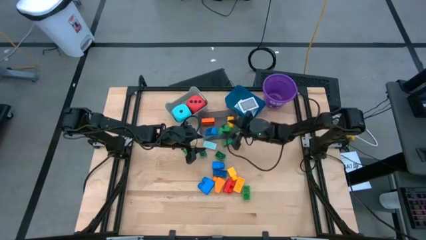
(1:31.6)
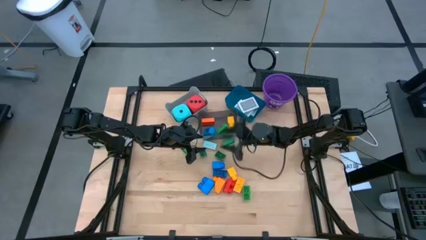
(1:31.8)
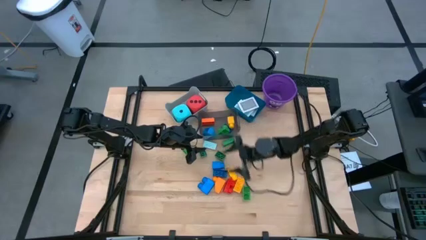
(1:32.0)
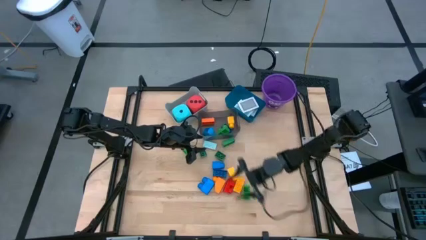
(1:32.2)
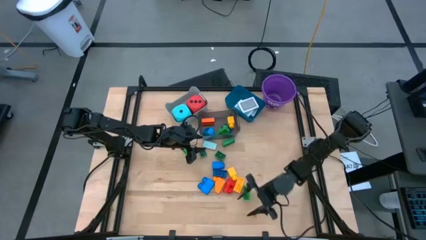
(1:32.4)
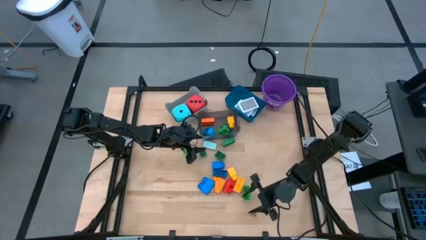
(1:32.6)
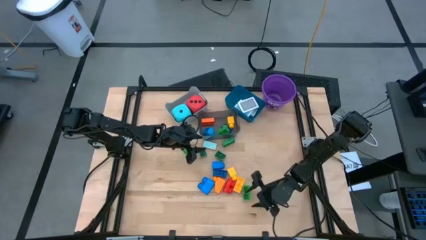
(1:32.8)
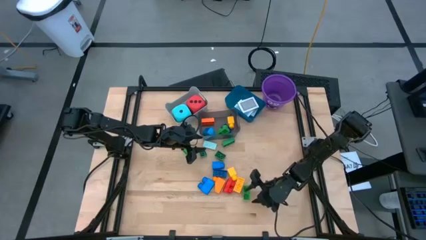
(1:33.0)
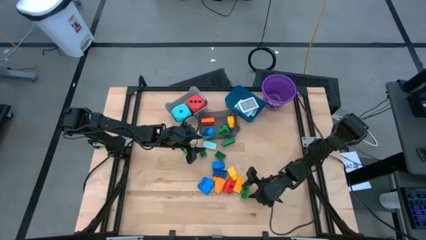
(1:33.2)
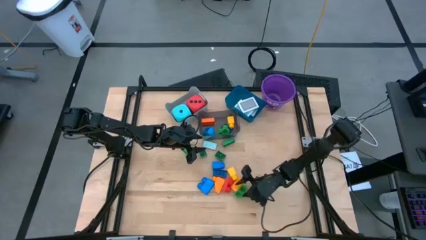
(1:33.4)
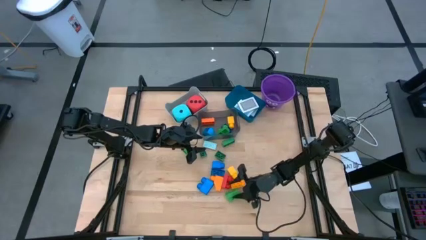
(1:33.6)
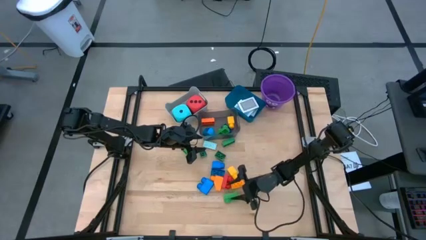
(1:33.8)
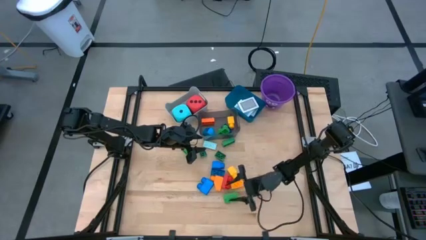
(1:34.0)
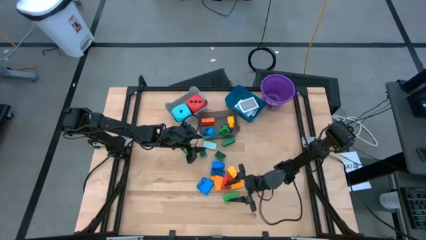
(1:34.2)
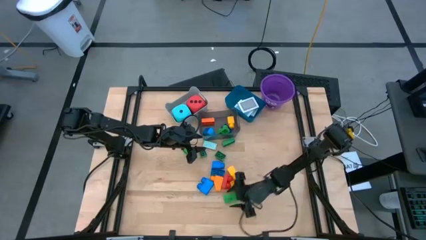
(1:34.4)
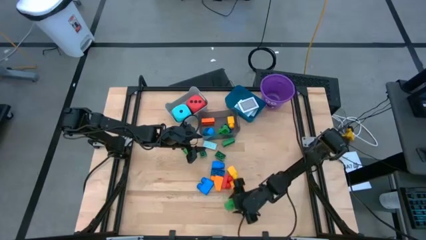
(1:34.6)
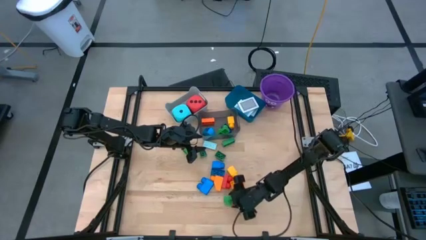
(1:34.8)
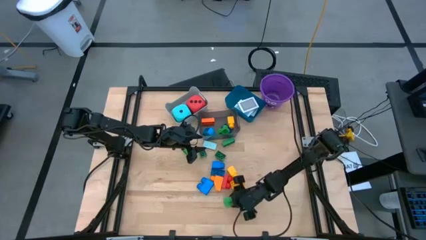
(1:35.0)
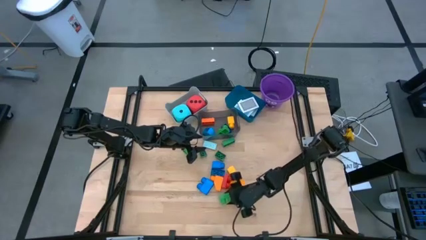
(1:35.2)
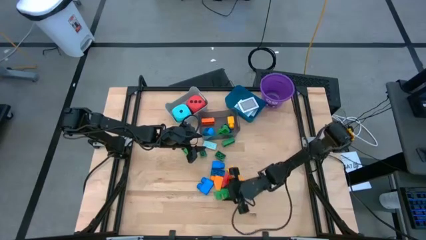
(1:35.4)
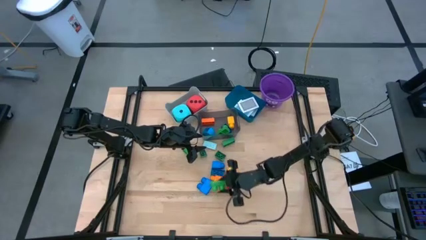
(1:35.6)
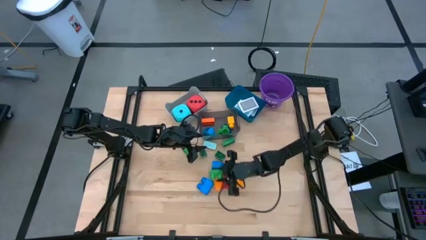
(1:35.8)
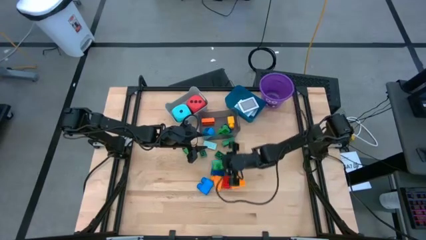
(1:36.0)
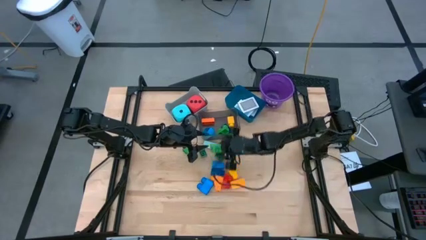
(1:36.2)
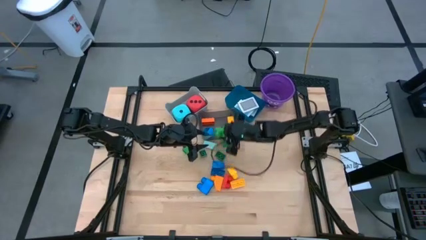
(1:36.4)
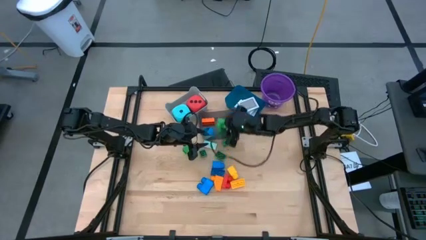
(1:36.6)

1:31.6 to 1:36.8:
Task: Pick & Place Toys
Put the green block into the black bin

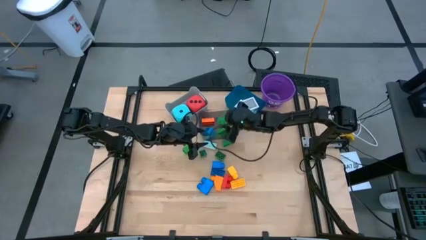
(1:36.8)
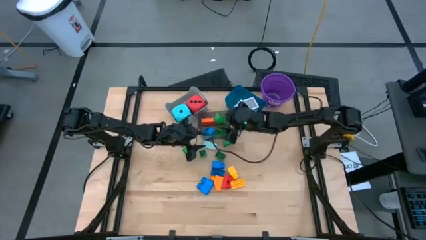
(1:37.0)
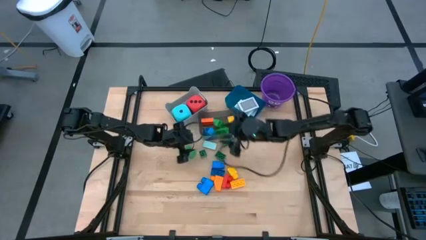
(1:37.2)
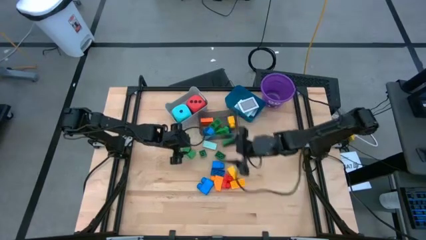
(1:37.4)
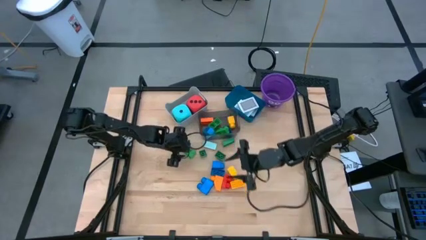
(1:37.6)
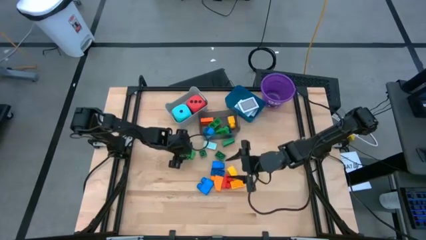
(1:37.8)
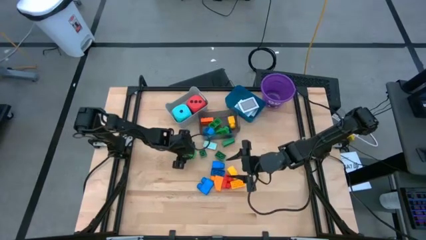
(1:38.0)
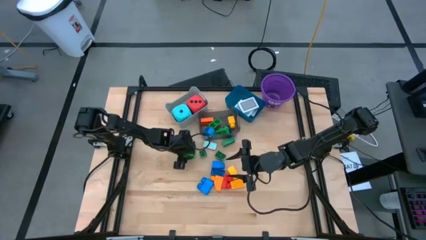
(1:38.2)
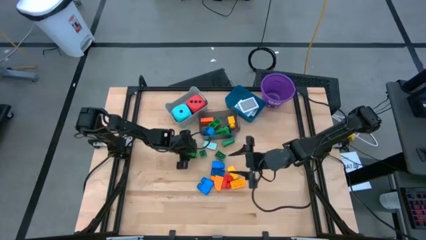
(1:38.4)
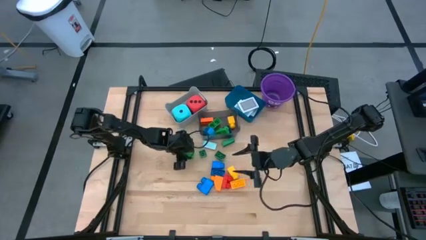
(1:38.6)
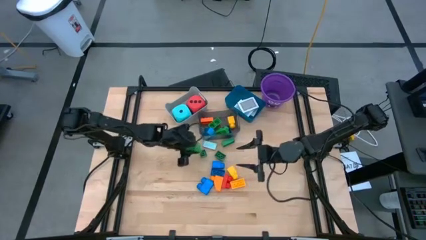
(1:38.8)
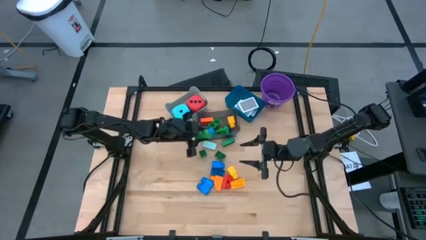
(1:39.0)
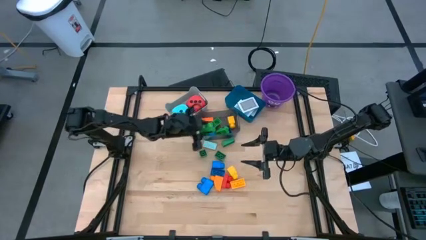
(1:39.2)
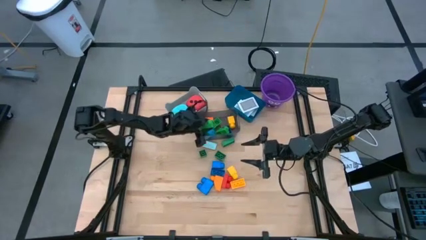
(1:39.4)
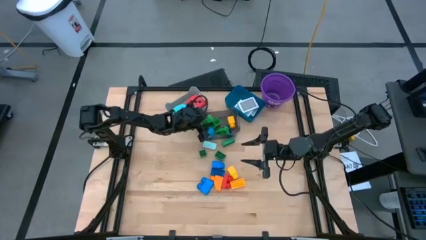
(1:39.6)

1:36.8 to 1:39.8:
Put the green block into the black bin

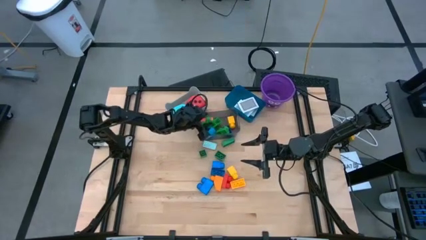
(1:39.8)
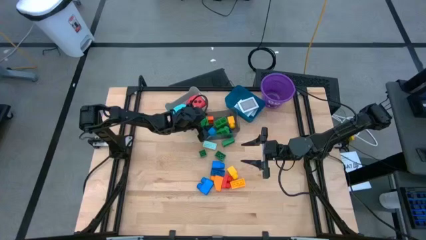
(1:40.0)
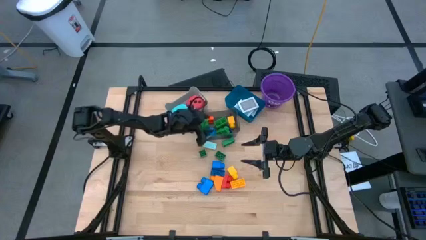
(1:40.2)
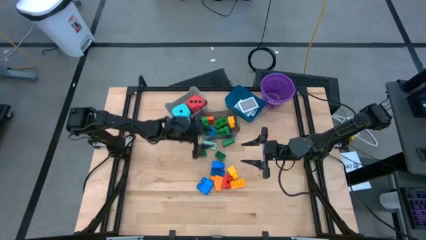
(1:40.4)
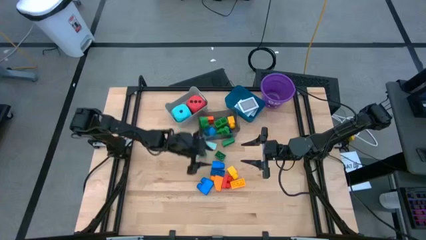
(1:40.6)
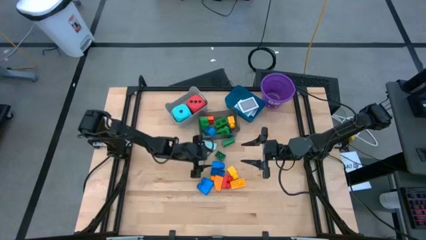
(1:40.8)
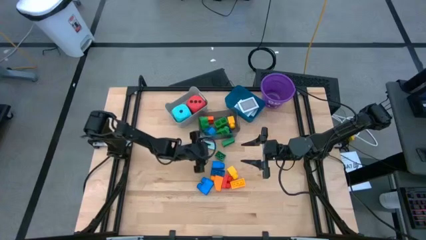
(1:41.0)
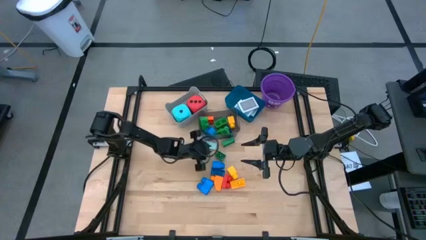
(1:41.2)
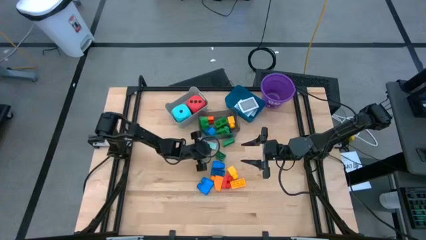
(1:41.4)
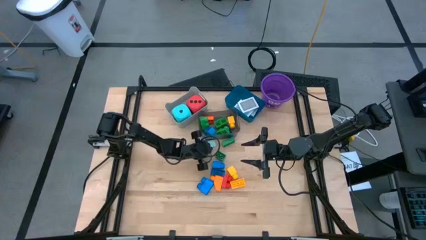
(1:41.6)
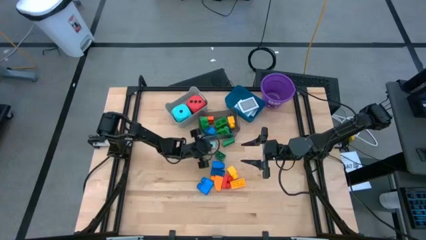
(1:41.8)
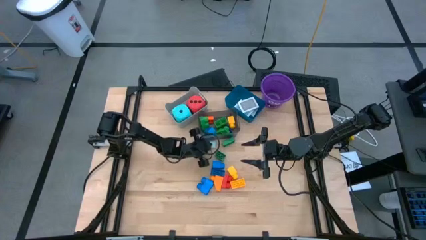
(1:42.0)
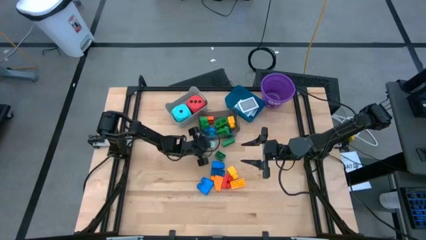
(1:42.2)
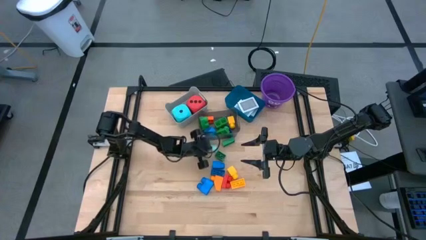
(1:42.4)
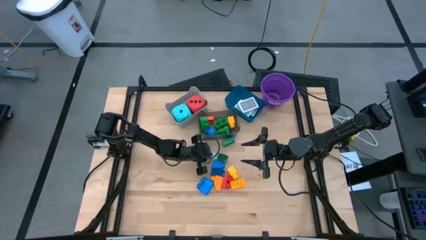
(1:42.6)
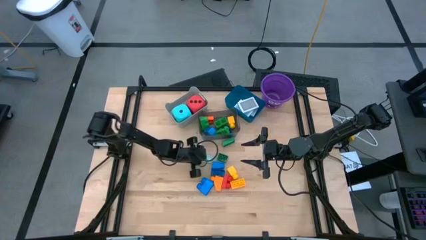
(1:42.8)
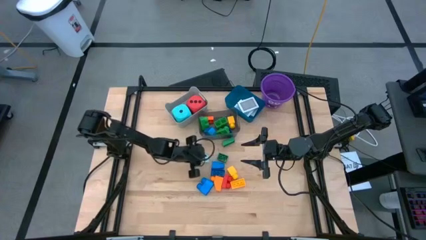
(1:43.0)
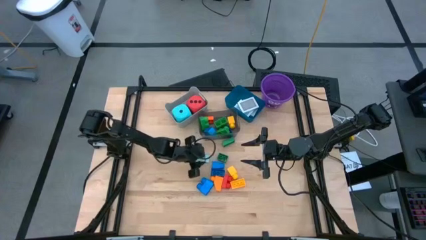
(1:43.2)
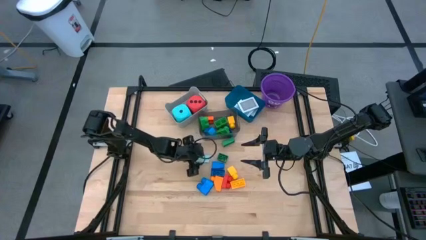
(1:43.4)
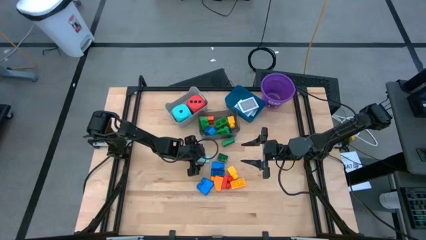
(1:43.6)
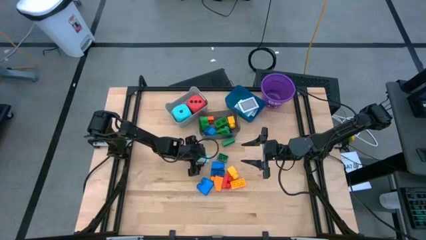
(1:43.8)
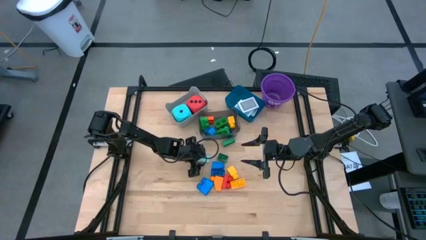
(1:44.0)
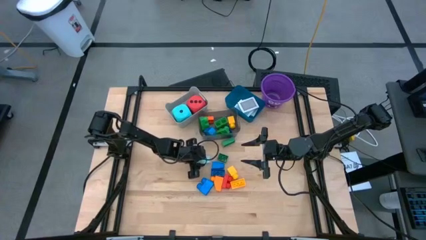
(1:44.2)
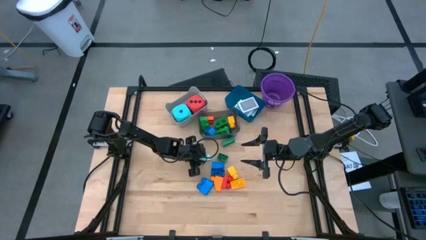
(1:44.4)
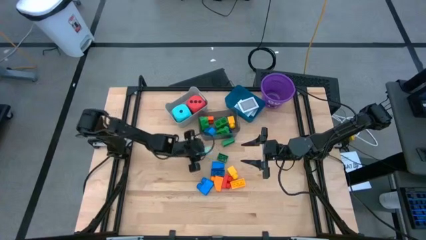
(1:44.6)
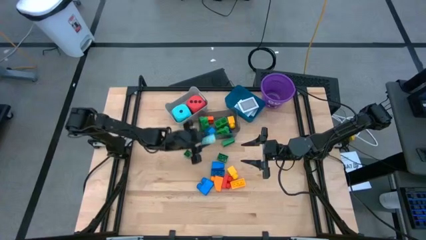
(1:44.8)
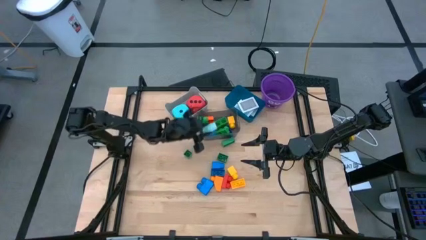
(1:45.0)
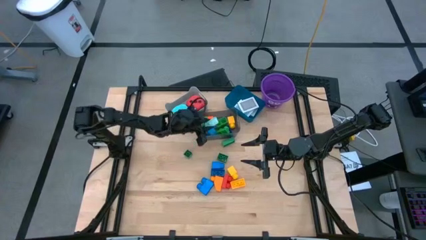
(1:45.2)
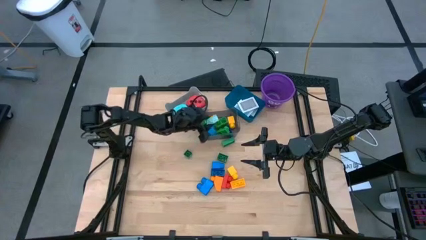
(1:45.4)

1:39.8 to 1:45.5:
Put the light blue block into the black bin

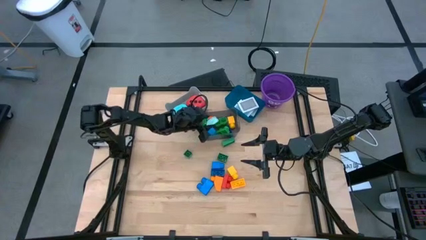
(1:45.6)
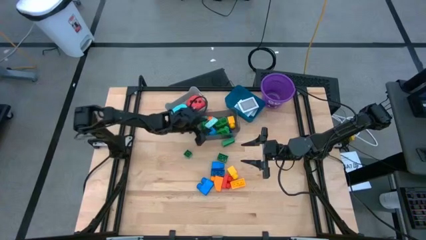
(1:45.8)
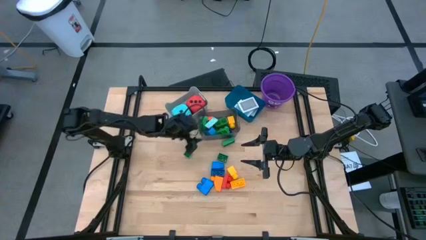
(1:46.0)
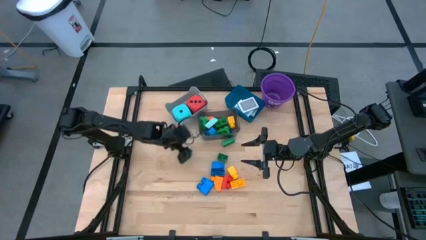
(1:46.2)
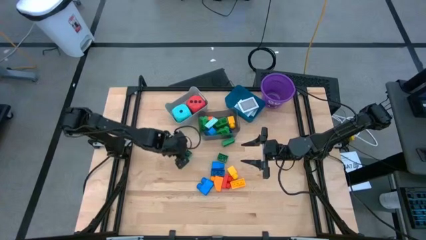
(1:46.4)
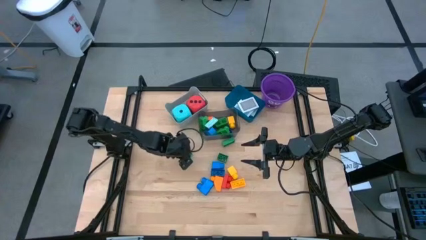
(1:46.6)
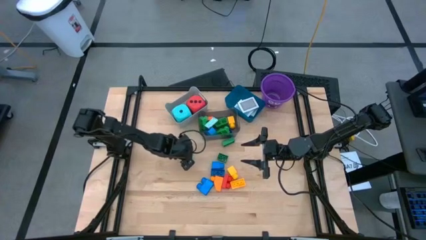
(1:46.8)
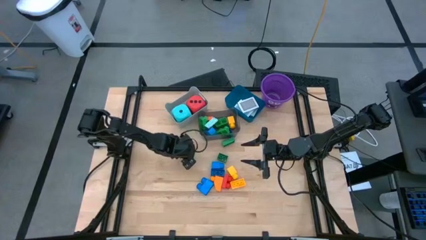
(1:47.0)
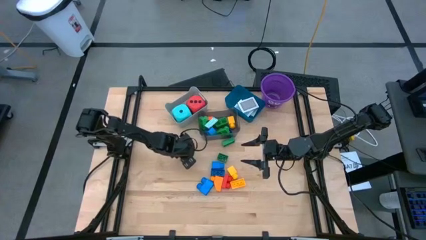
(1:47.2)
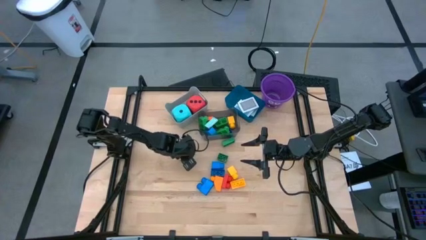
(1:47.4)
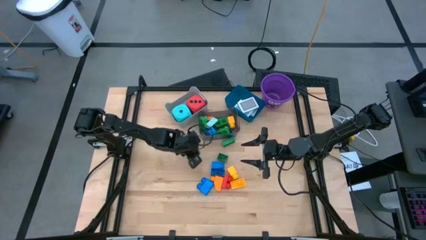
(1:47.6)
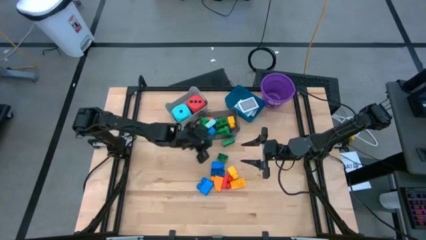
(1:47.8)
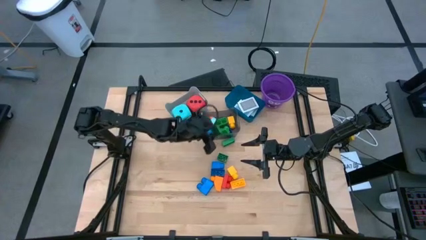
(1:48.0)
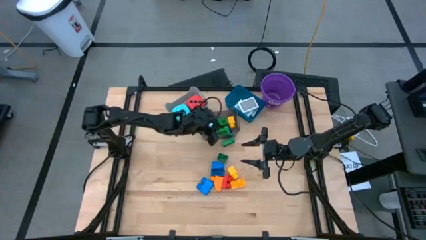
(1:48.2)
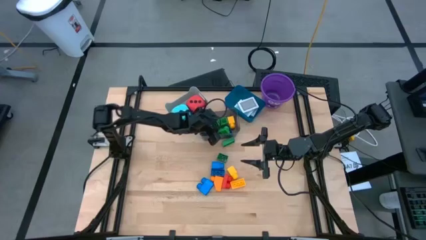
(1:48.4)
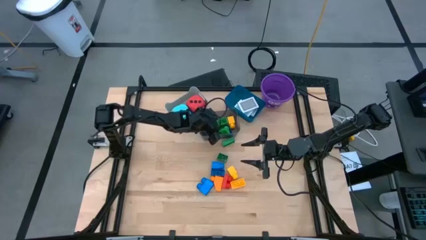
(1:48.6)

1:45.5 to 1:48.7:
Put the green block into the black bin
